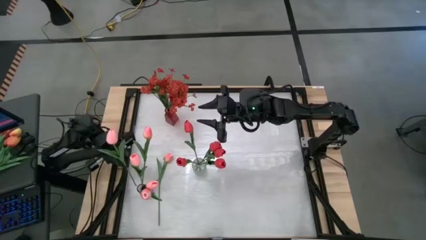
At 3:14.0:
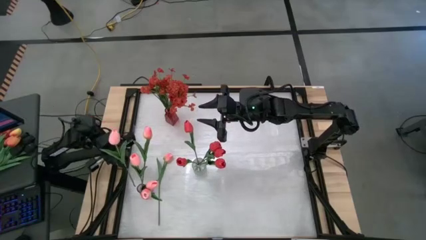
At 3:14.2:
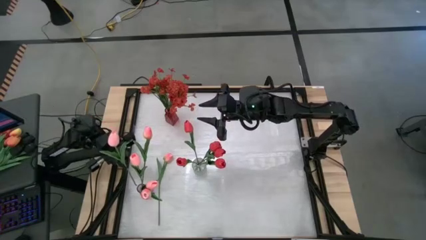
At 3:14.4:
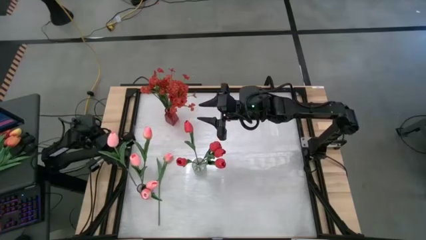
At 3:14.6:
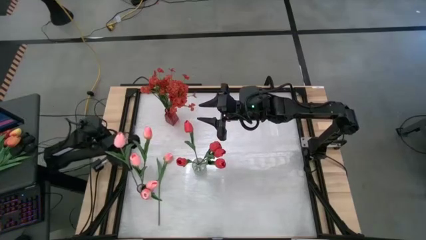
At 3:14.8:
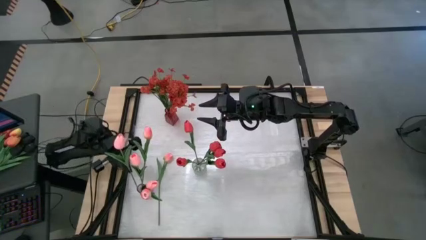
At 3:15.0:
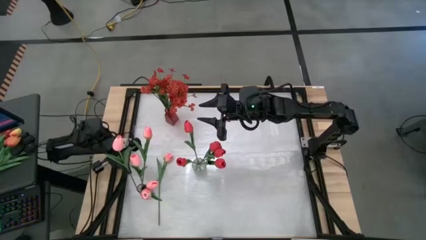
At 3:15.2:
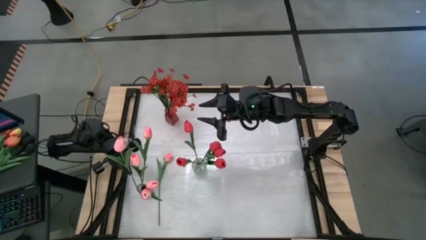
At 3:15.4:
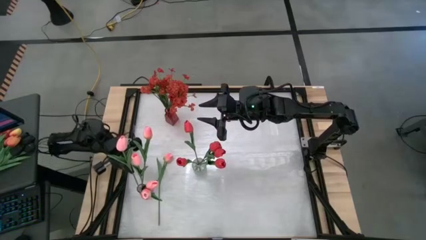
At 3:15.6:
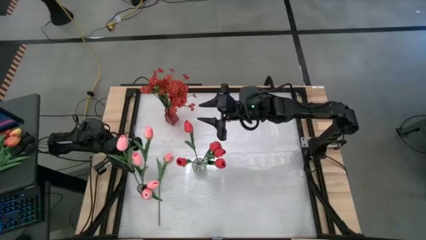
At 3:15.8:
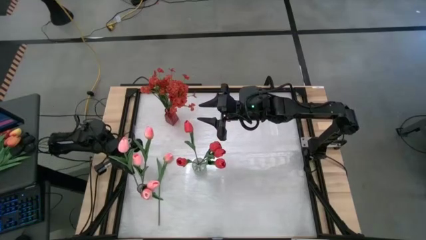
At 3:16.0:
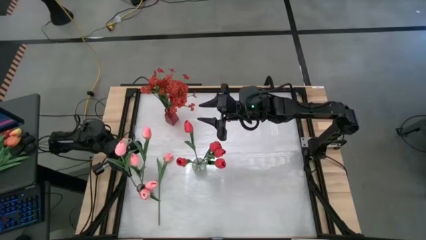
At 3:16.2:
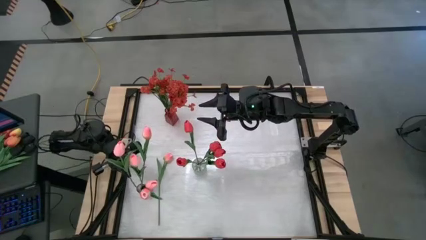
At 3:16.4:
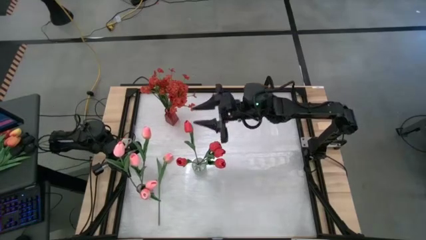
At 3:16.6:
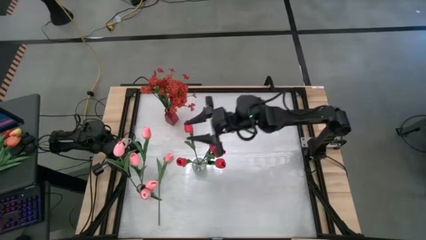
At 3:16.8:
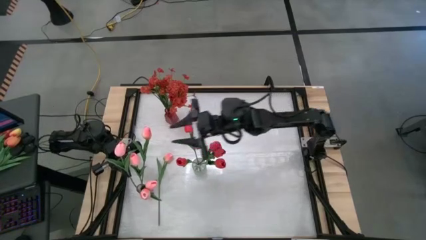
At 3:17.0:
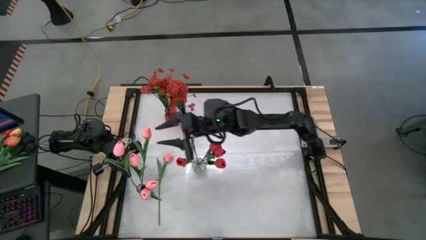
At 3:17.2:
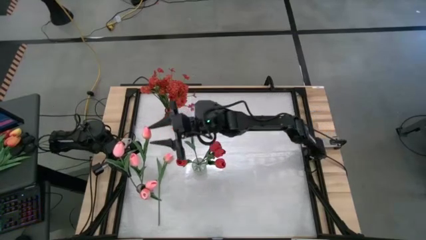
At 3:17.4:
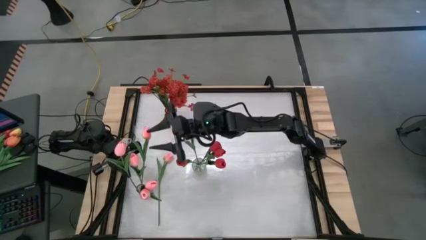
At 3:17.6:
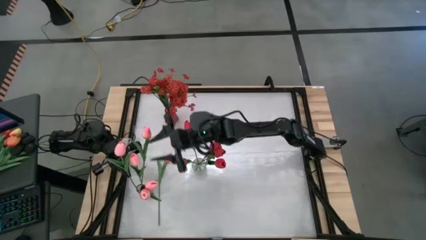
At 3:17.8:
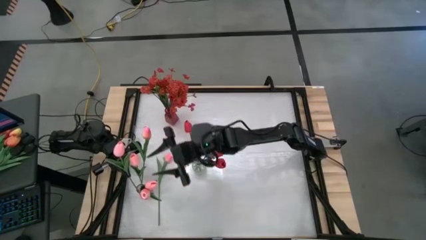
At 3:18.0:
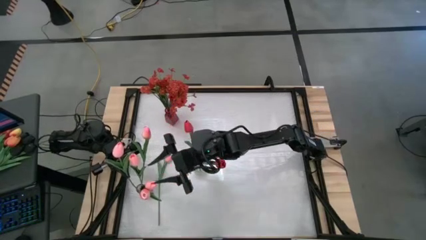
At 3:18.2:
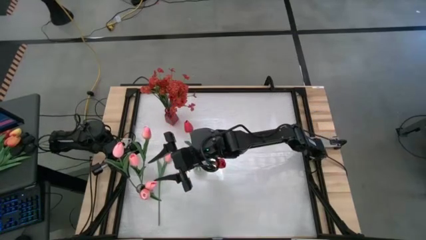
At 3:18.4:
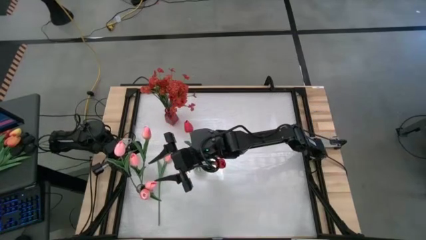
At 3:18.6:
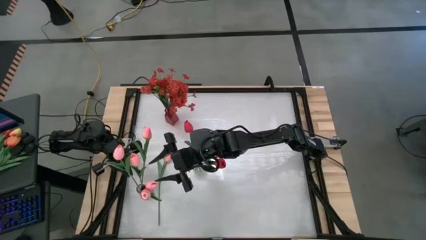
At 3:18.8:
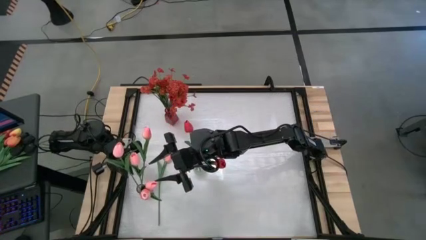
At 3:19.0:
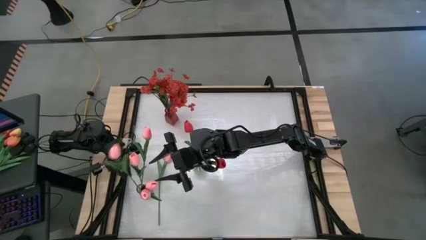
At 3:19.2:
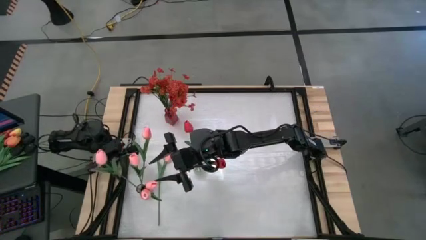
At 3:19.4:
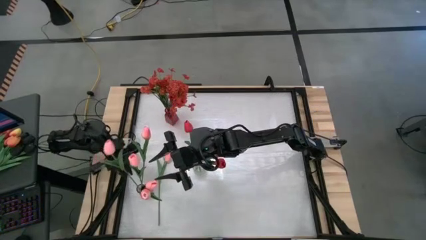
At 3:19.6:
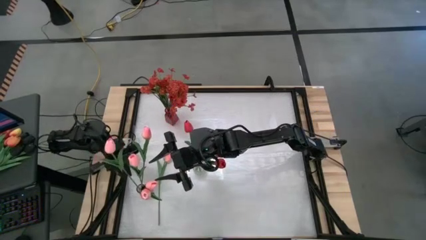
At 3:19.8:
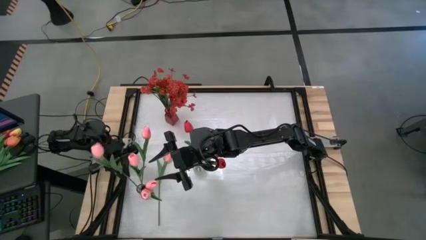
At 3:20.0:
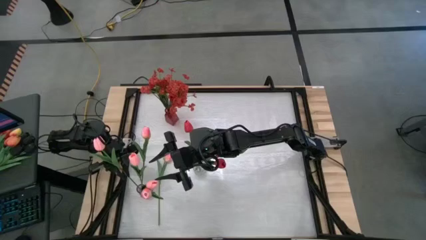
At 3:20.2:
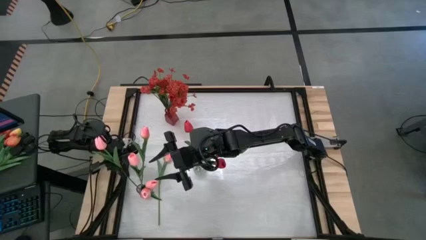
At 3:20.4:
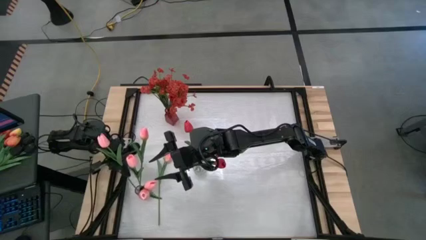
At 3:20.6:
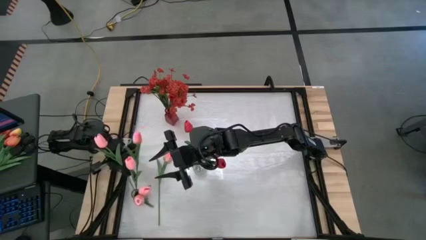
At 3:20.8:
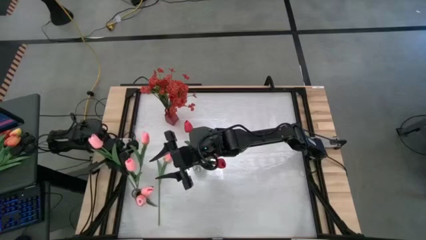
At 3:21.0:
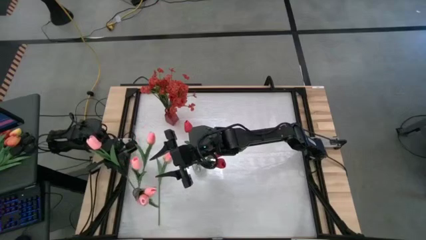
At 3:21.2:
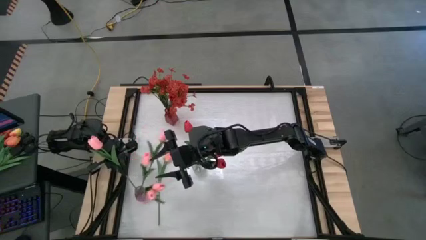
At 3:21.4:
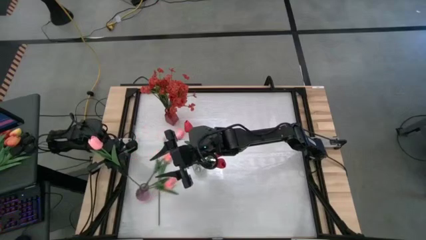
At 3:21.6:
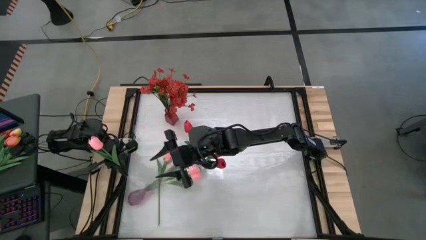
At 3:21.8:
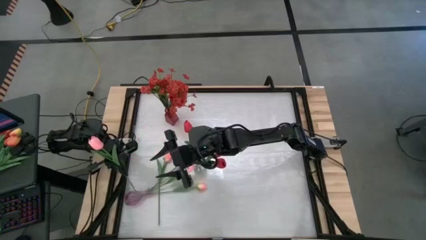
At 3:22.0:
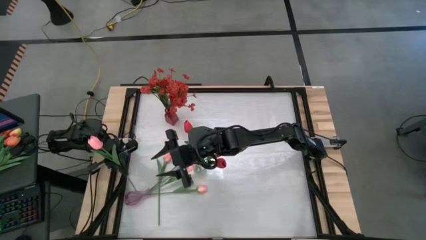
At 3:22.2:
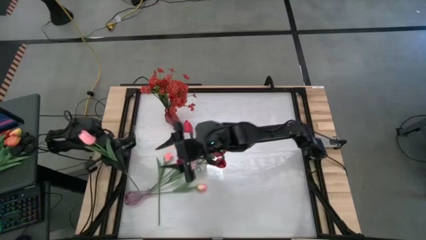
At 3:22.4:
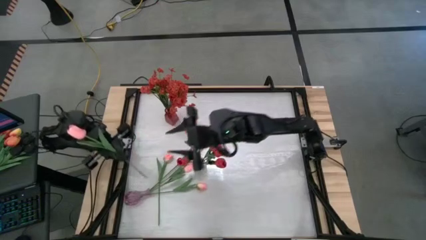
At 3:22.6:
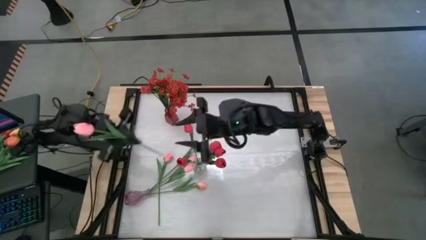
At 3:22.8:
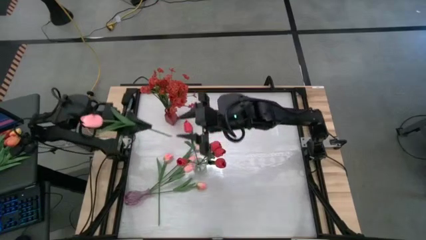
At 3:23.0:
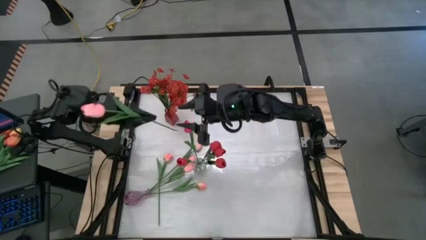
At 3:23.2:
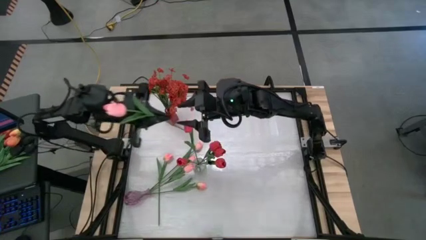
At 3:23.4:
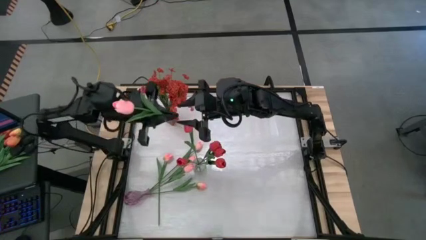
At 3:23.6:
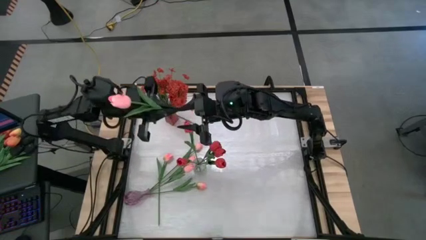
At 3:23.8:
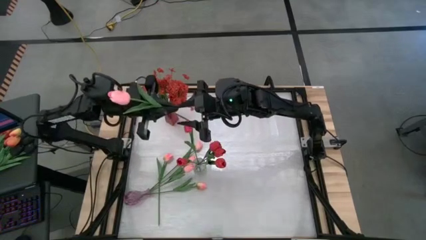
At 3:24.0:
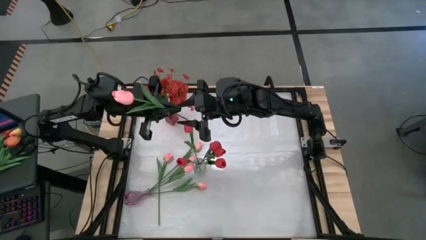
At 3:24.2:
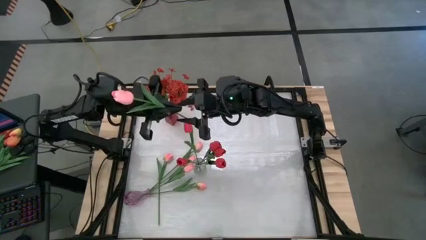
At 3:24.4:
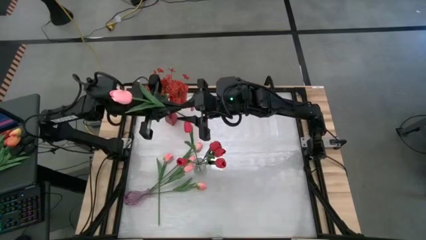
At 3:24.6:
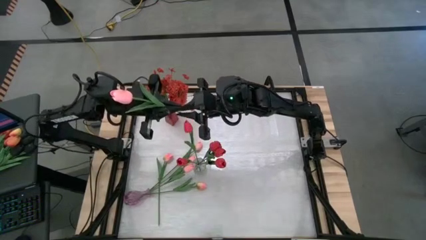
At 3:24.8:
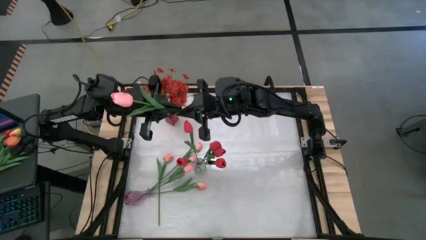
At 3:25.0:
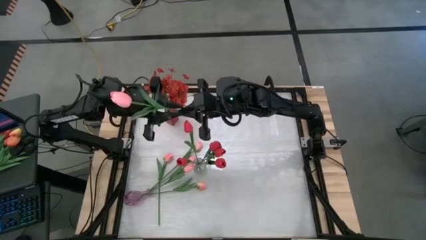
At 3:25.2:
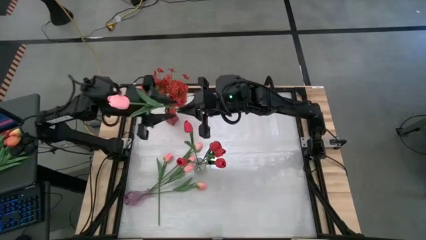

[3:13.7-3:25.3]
Task: Sort flowers into vase by color
Put the pink flower into the purple vase
